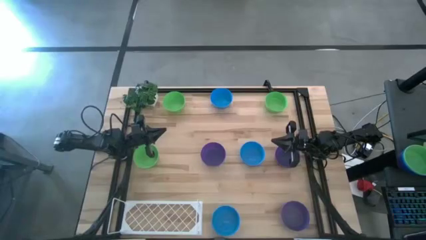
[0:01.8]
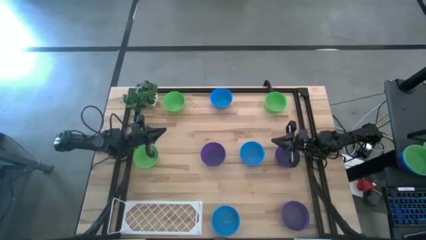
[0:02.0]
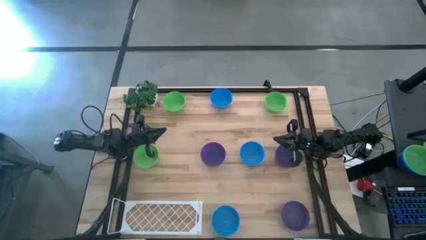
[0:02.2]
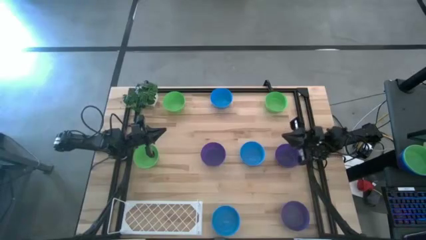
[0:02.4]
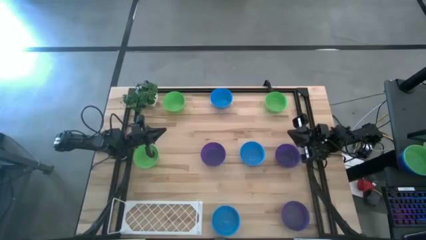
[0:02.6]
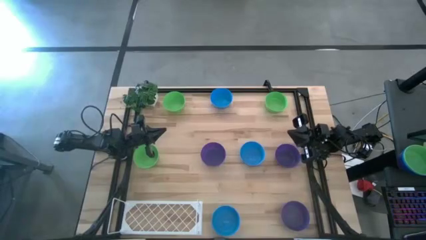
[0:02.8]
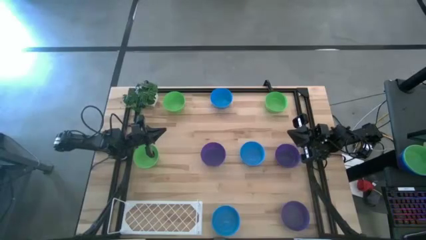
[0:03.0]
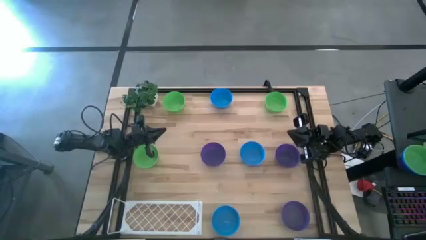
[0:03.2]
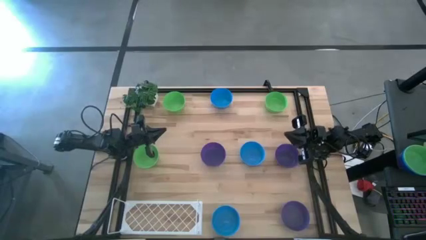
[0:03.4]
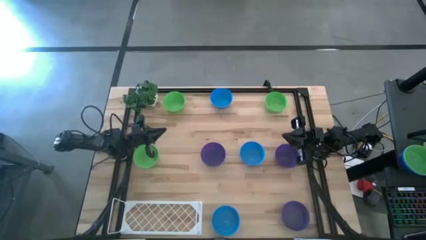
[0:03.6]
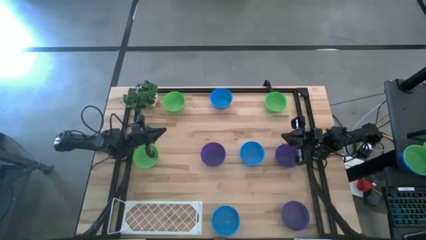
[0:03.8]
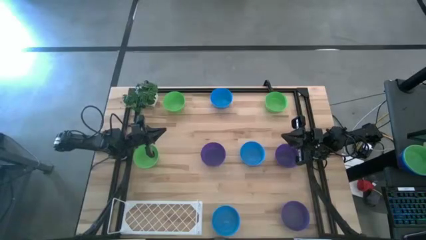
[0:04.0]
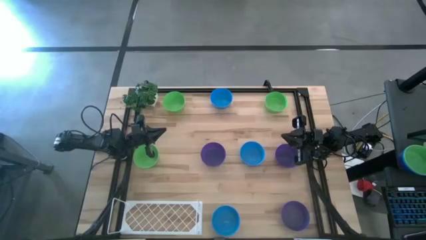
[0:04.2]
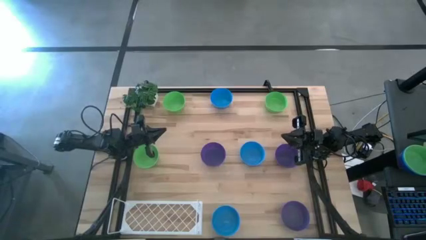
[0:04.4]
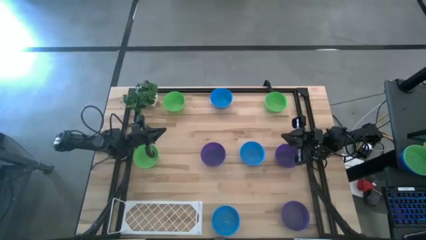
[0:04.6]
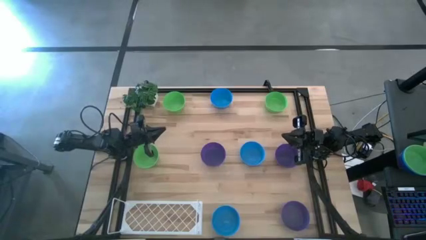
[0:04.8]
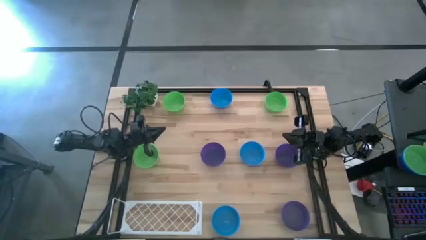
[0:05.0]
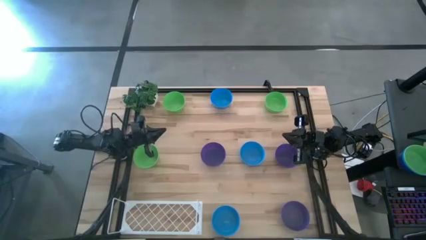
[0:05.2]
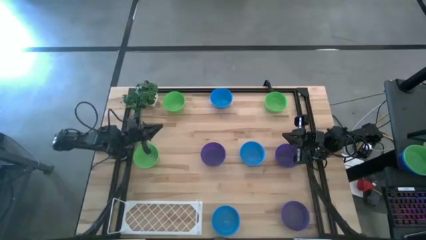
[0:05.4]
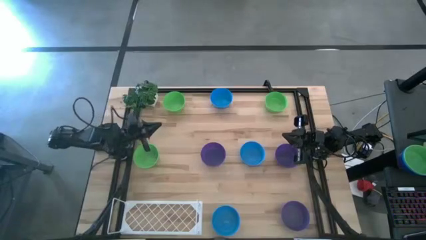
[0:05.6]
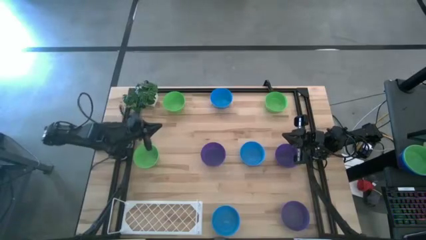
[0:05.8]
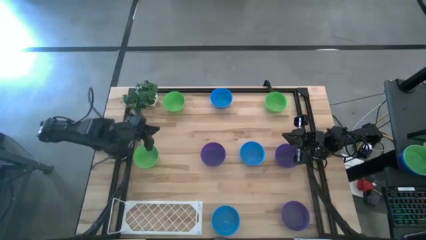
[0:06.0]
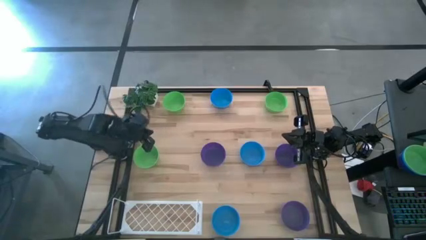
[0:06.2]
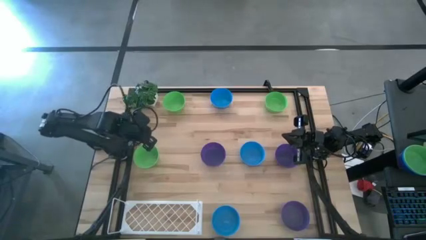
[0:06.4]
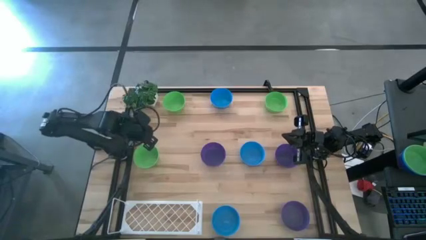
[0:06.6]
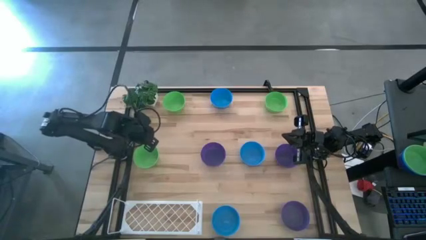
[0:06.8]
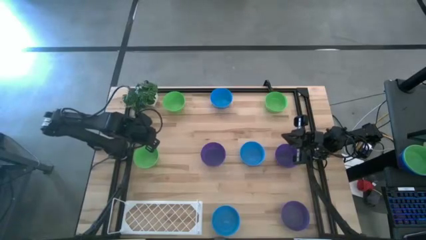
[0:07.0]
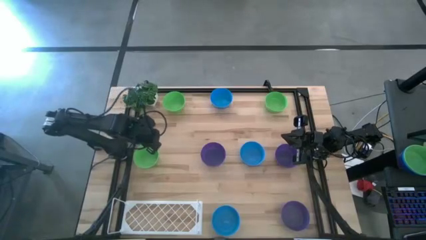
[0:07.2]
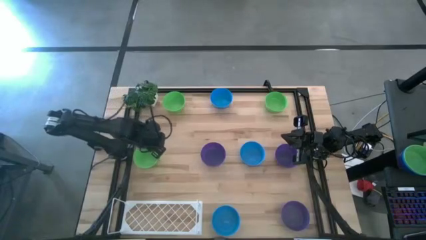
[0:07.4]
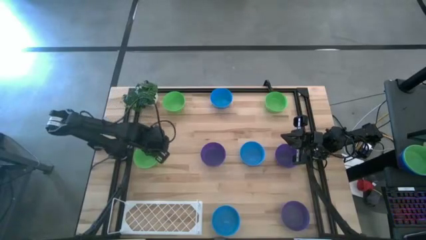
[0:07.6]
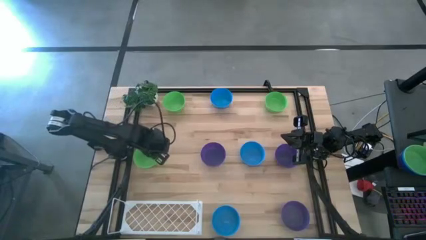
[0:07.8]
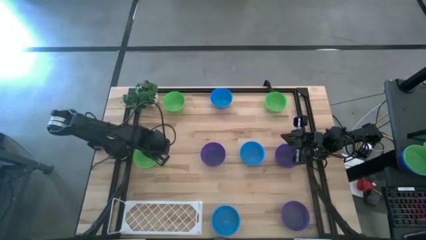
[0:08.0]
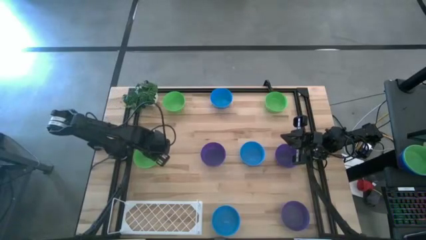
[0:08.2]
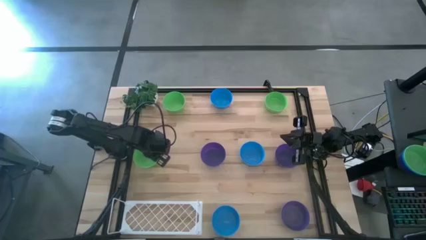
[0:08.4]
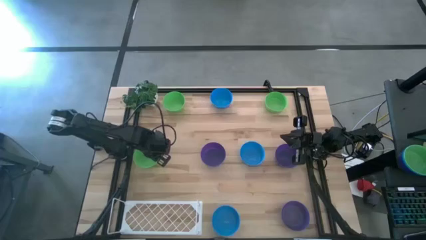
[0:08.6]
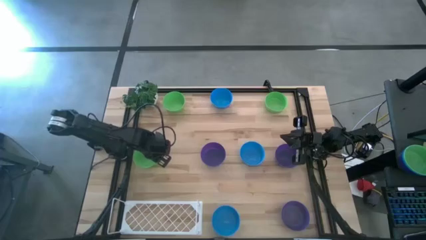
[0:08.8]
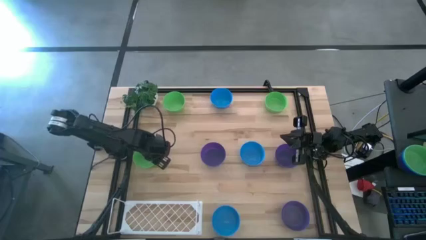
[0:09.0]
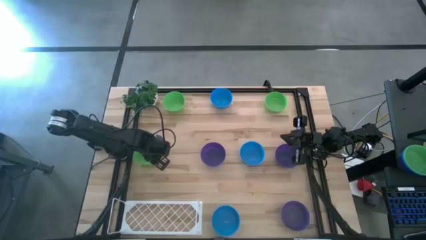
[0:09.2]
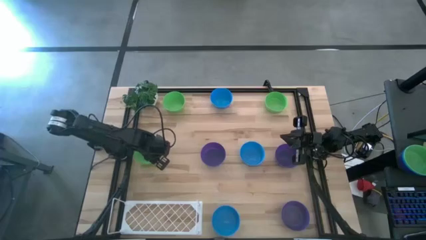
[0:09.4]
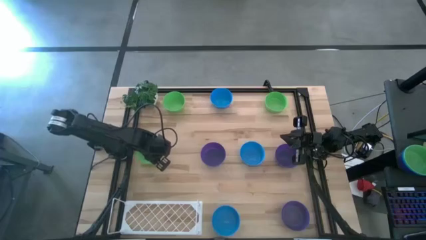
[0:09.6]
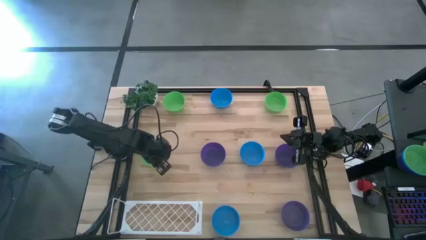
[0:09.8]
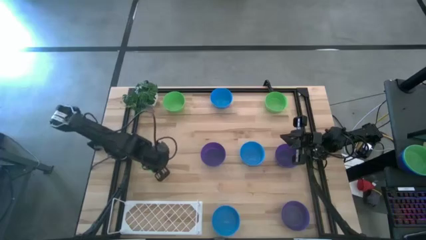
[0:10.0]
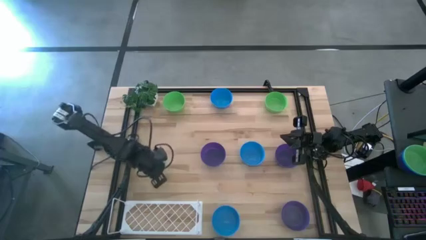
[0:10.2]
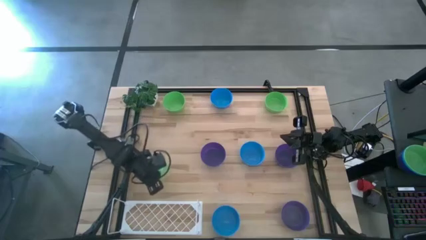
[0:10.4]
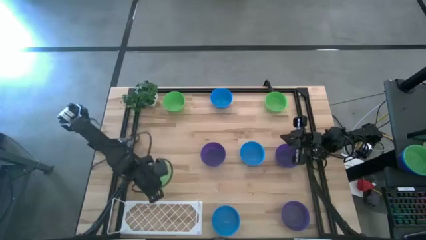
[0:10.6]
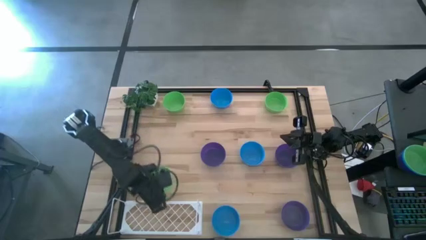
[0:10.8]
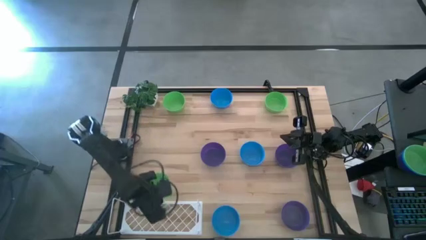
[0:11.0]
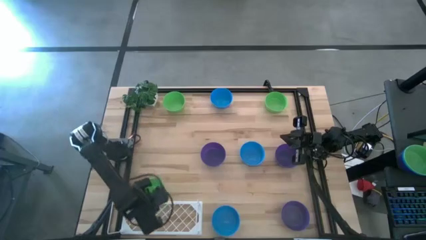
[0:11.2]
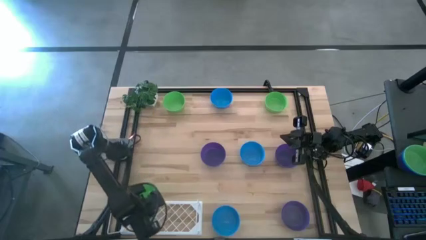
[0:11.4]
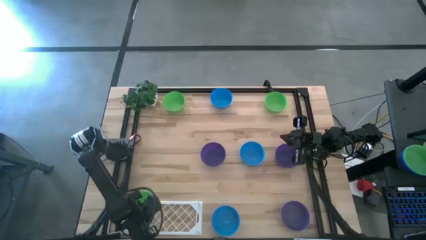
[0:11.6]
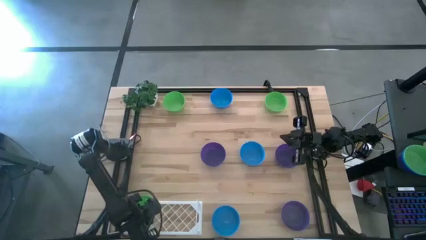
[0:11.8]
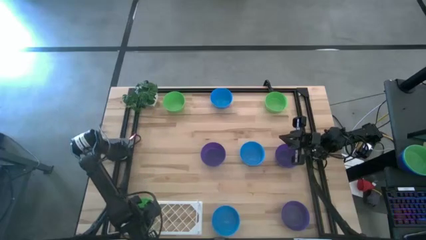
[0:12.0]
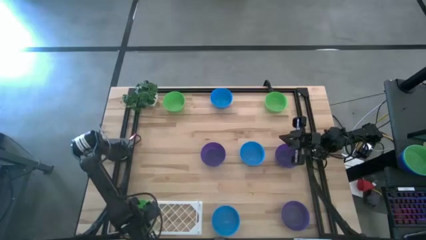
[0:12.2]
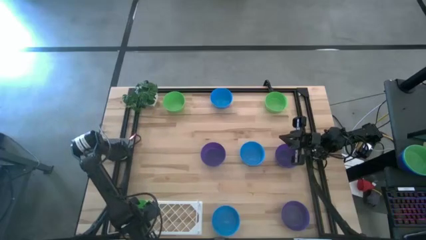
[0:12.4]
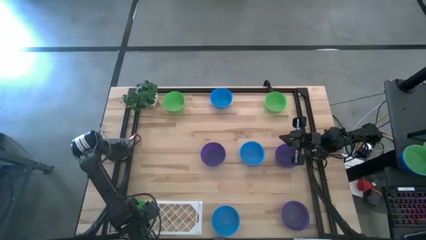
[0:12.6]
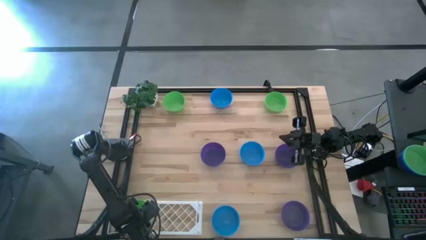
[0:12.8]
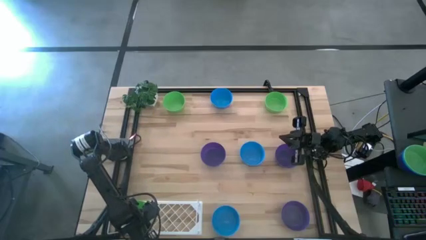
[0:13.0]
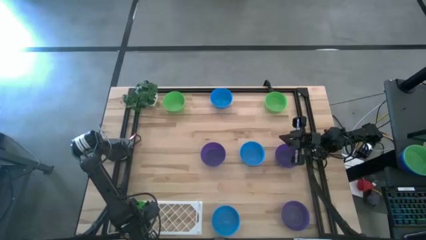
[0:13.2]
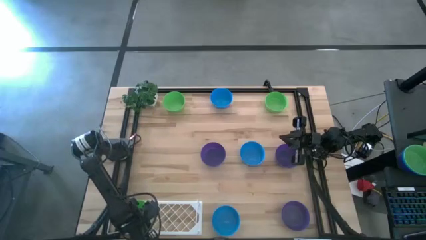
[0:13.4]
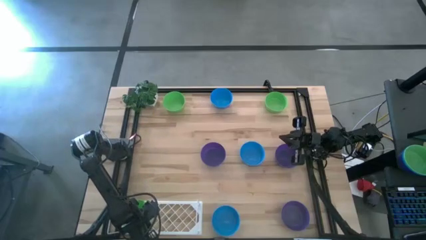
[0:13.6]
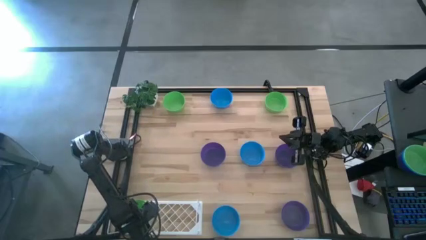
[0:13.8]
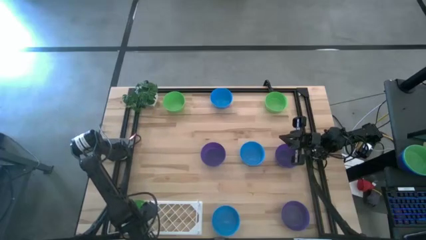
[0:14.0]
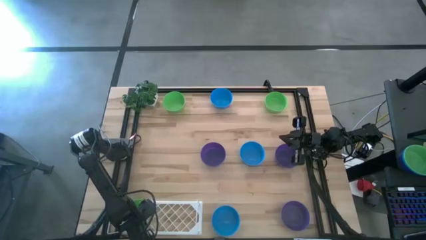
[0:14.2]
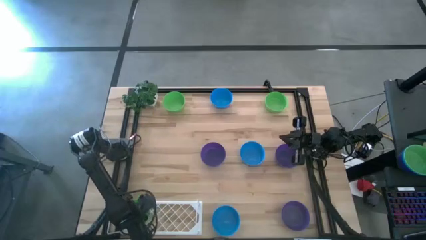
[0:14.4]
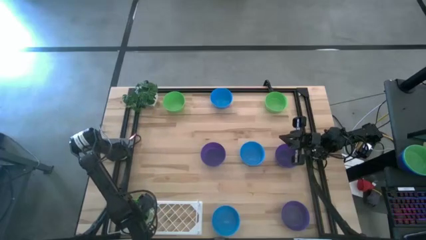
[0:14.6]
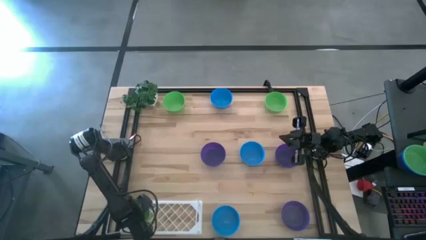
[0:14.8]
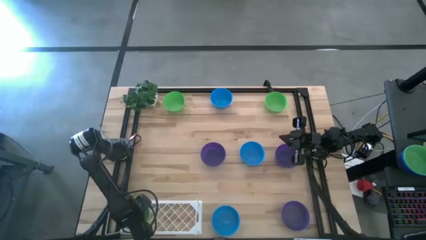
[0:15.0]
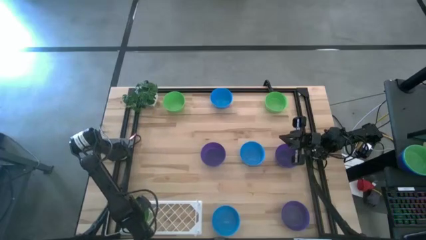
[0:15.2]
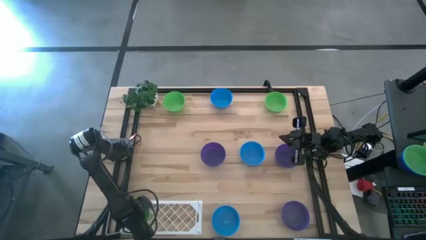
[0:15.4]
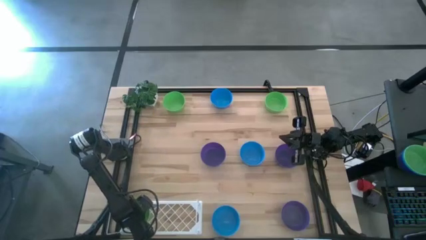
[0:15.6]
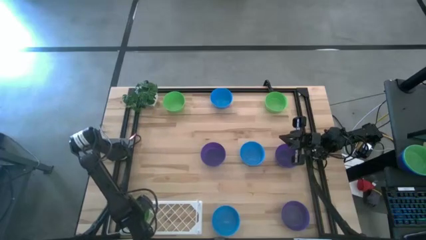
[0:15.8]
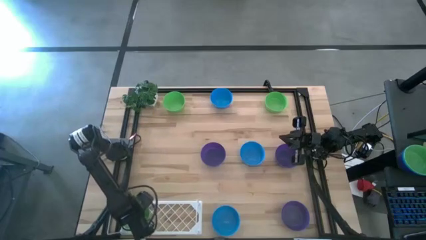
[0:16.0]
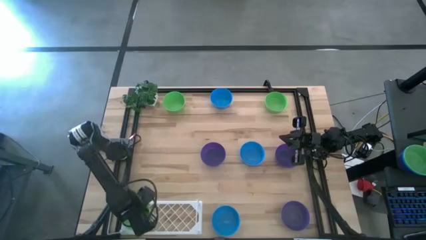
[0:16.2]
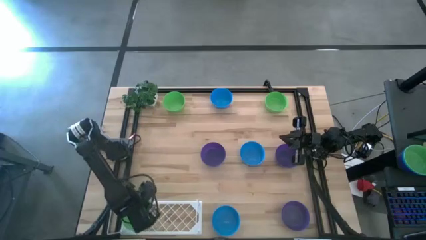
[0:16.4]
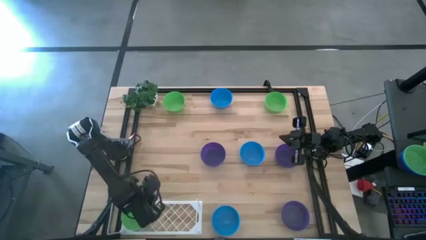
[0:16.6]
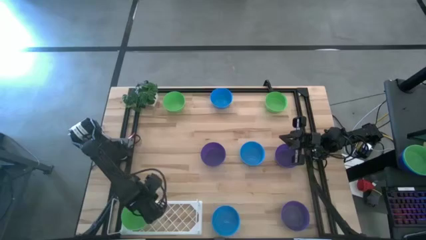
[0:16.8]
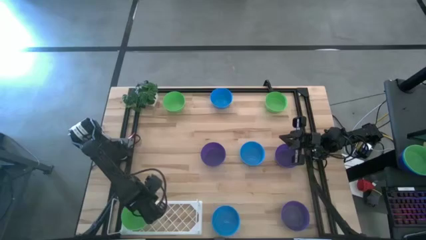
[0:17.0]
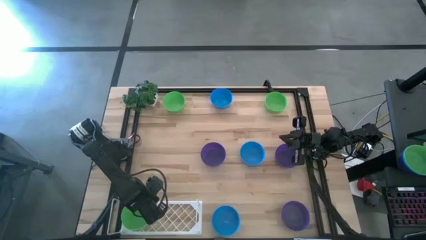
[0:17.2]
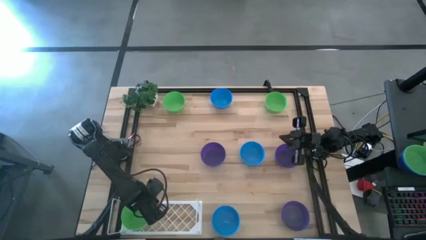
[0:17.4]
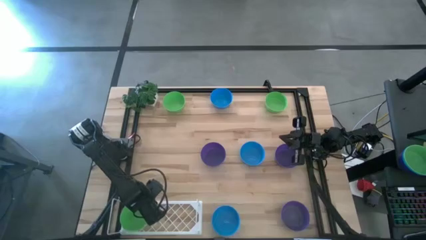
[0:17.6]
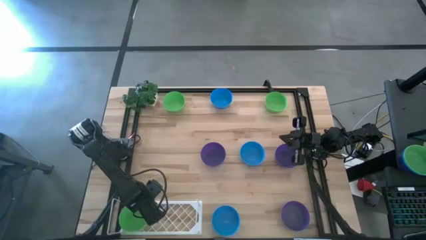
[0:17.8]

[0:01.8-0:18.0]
Task: Pick & Place Mini bowls
Put the bottom green bowl on the shelf
